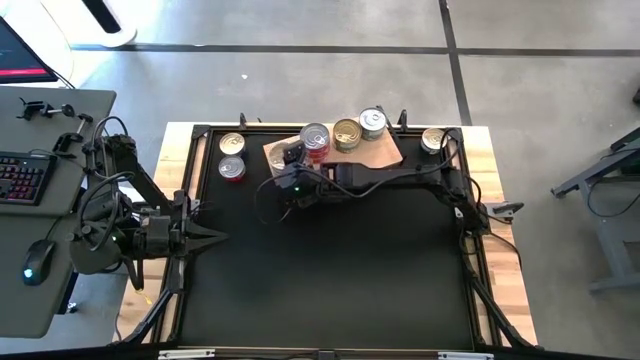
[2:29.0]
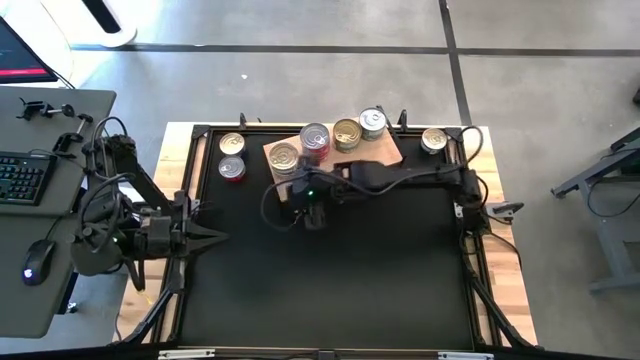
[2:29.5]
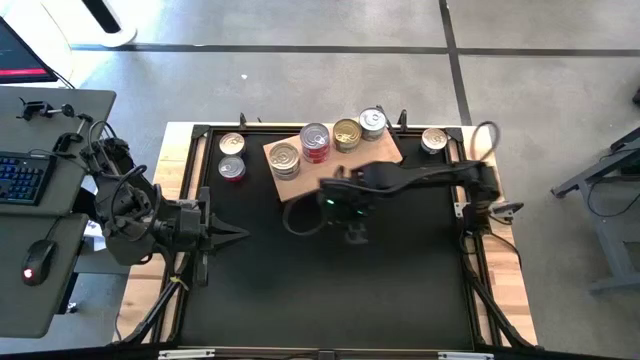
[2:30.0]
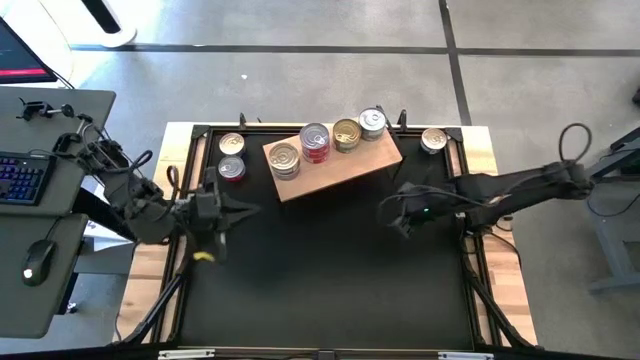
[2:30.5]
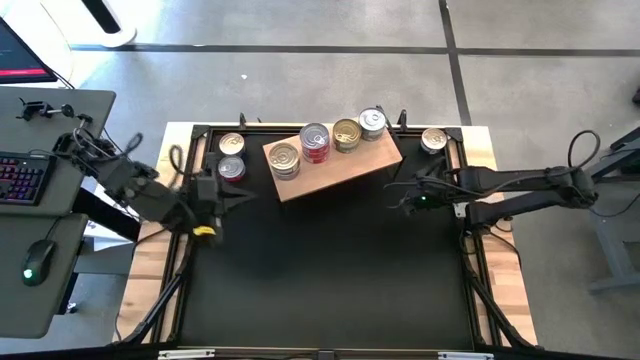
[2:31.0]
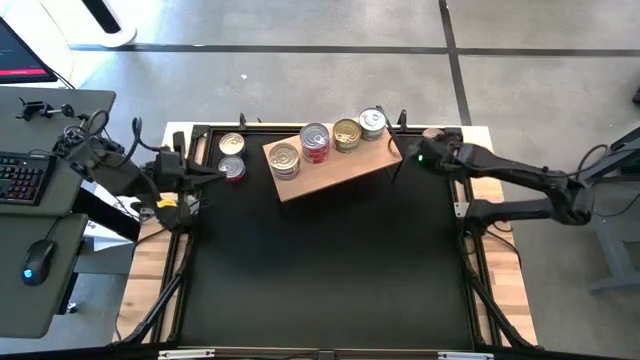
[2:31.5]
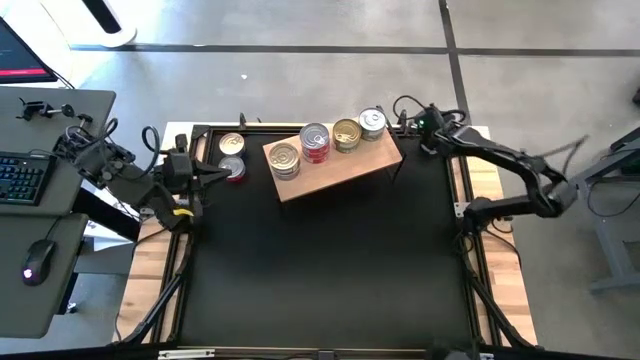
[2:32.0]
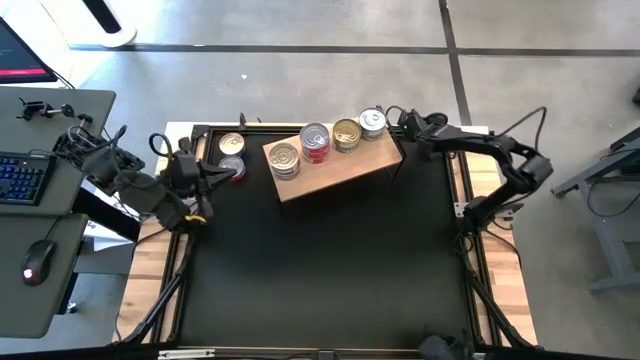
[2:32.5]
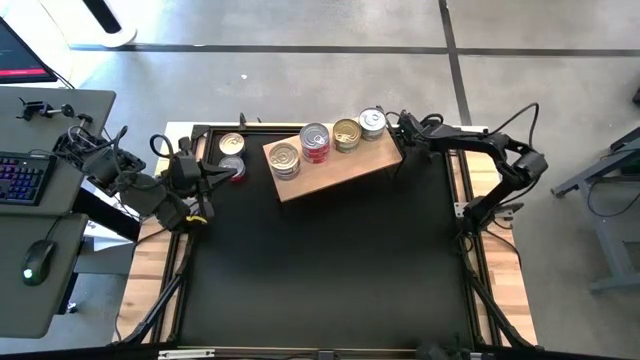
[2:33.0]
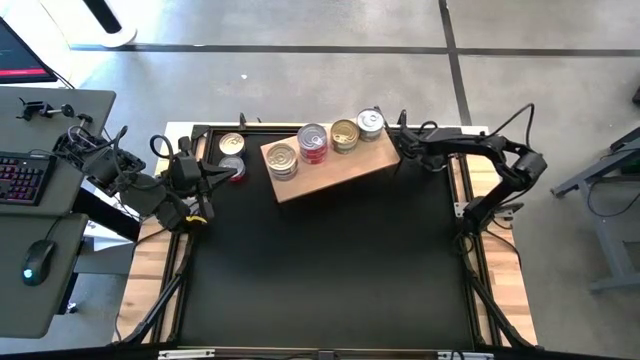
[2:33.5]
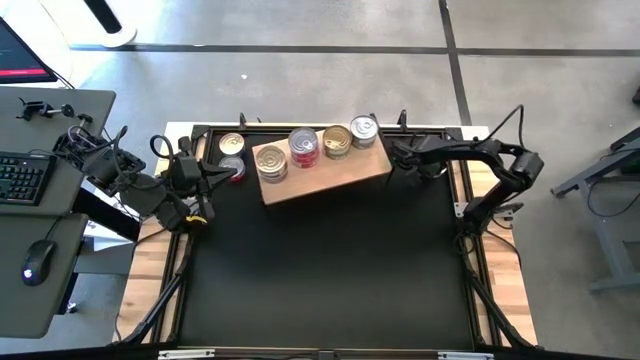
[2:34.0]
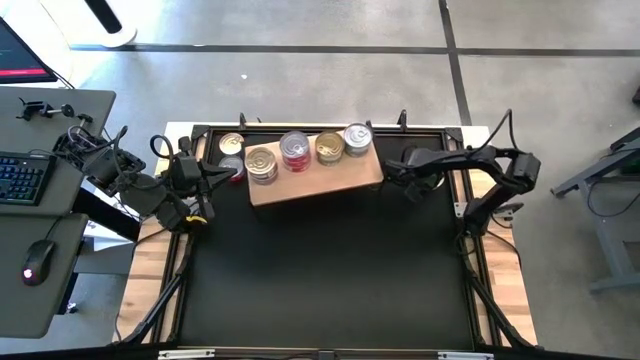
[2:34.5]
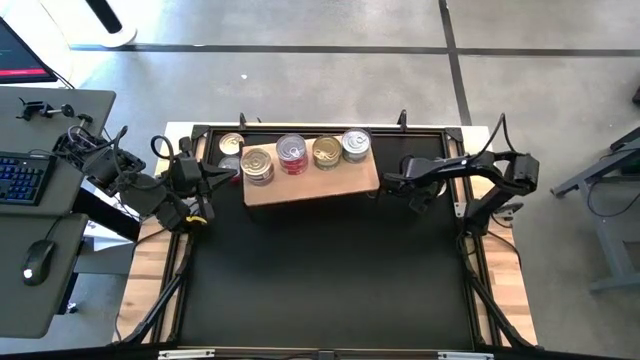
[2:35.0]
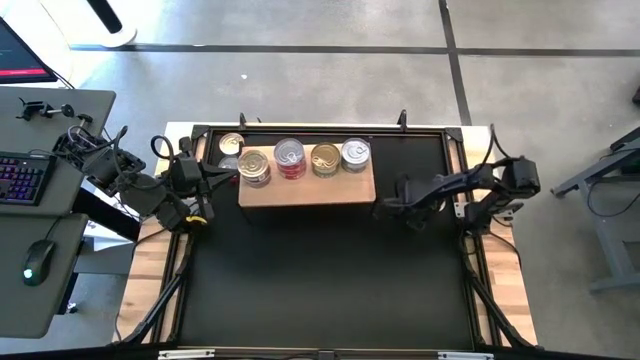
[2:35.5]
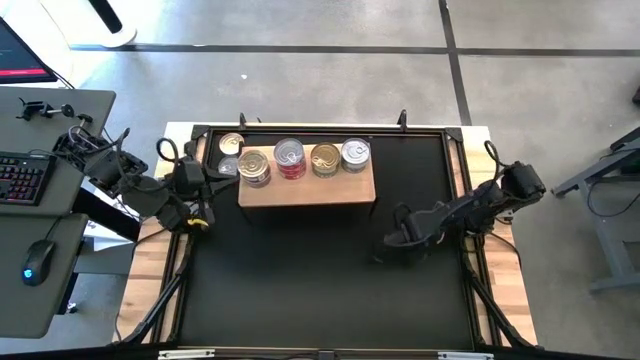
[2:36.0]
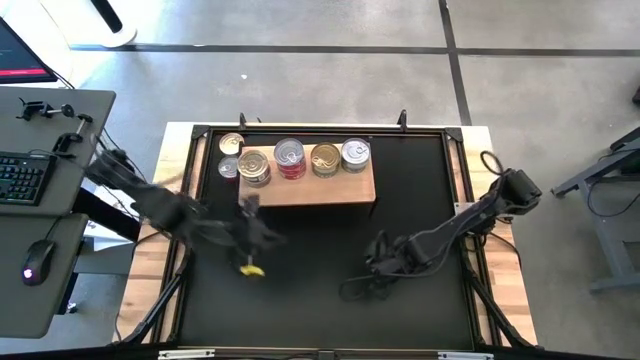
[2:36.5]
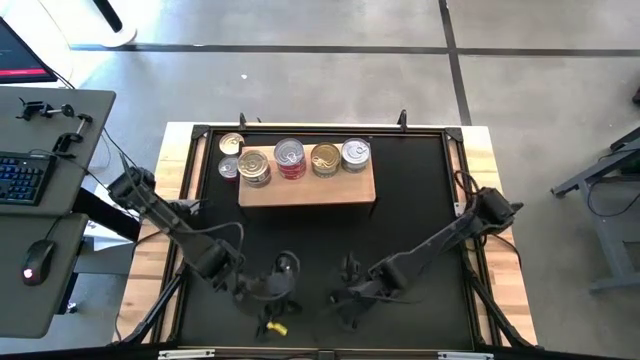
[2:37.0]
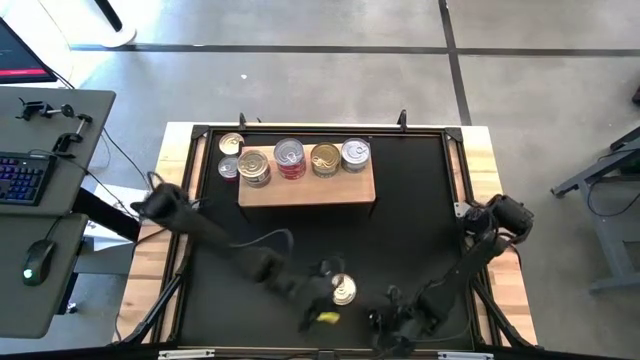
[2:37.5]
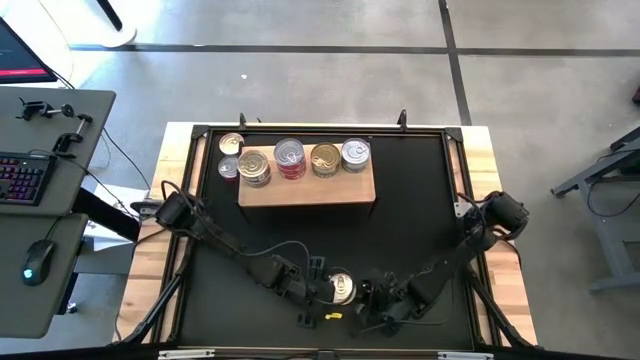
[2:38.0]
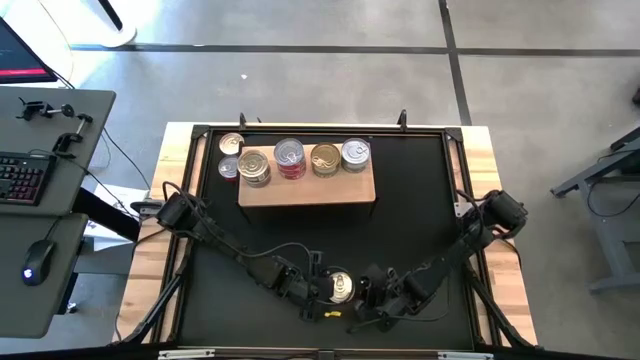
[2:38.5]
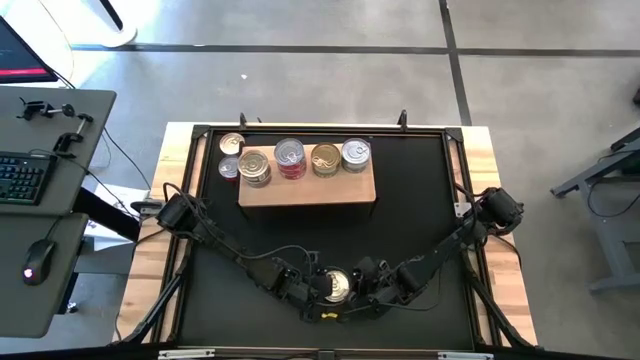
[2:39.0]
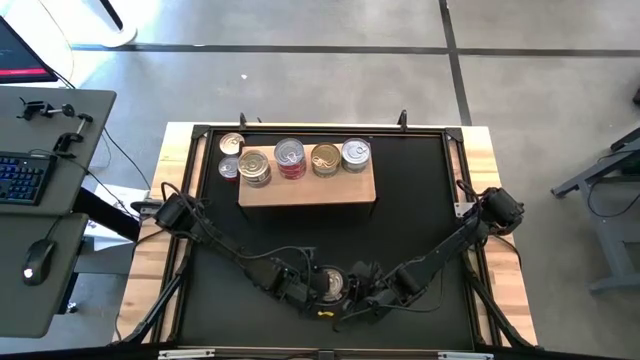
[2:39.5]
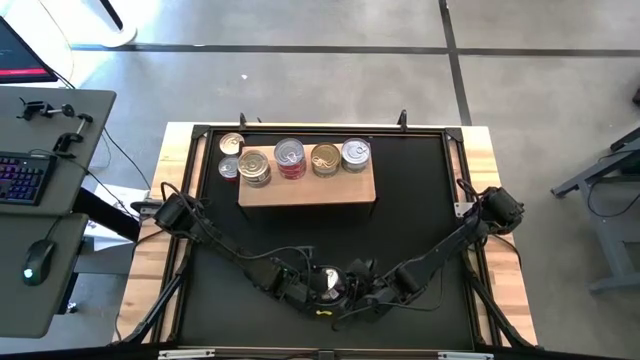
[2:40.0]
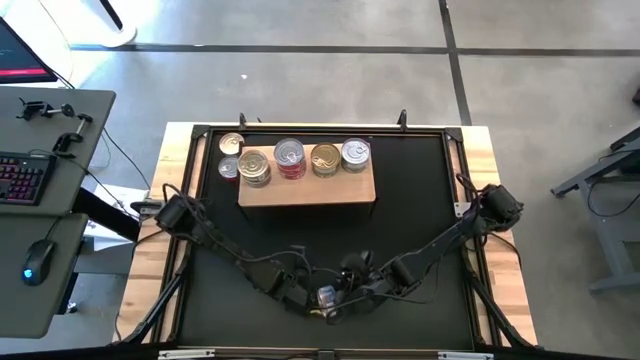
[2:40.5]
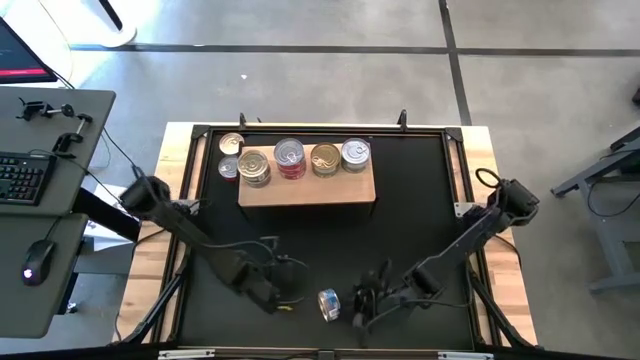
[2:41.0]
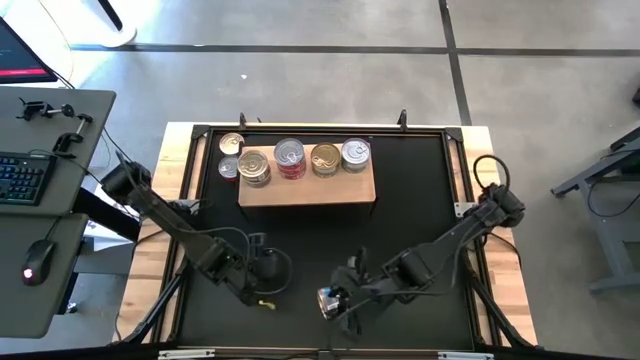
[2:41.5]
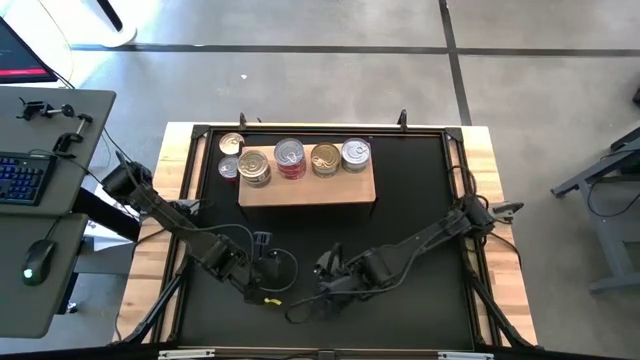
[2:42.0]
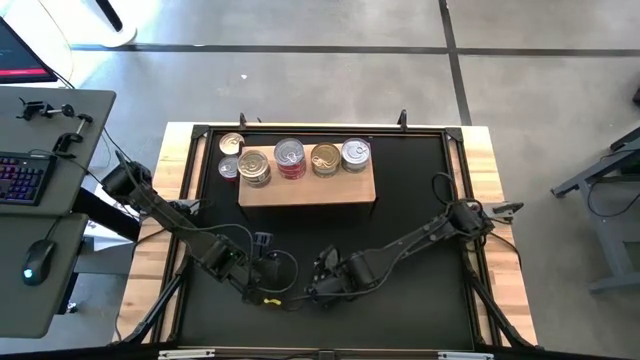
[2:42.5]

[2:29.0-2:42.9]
Task: Stack canned seafood by type on shelf
Stack the right blue and red tuna can on top of the blue and red tuna cans on the shelf

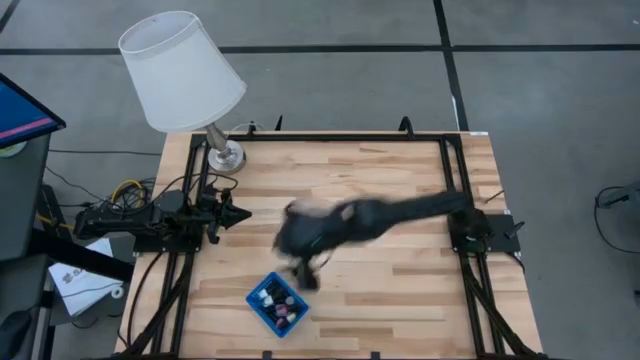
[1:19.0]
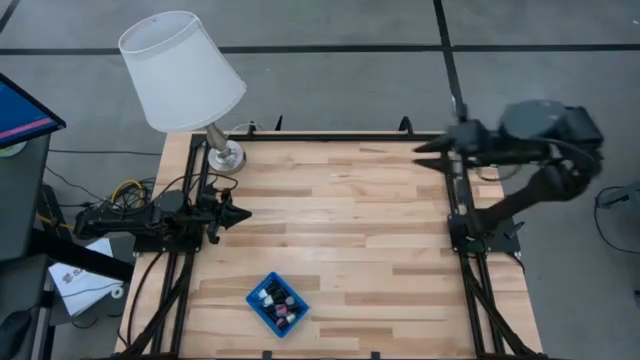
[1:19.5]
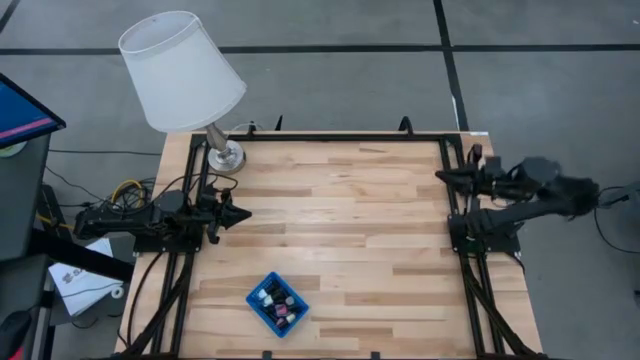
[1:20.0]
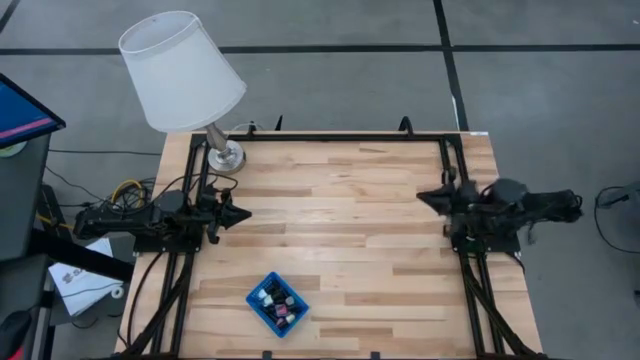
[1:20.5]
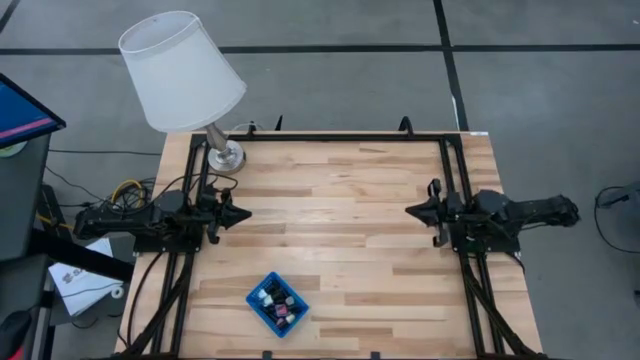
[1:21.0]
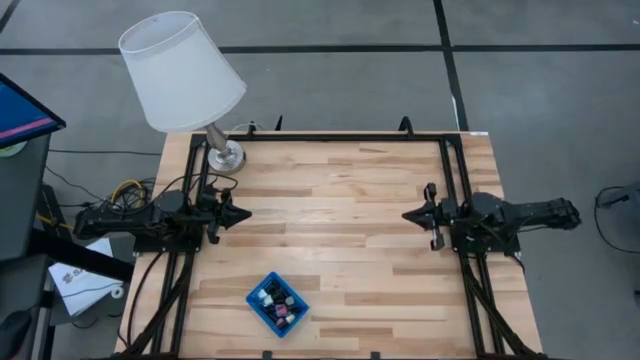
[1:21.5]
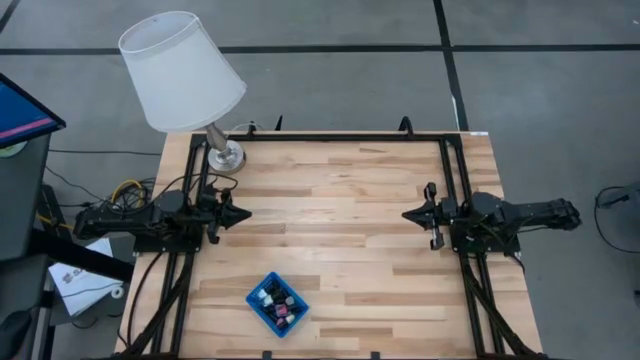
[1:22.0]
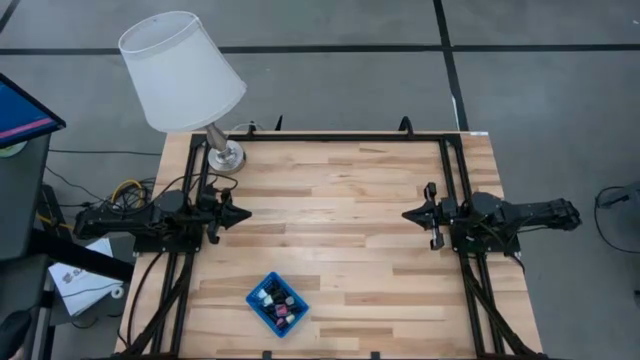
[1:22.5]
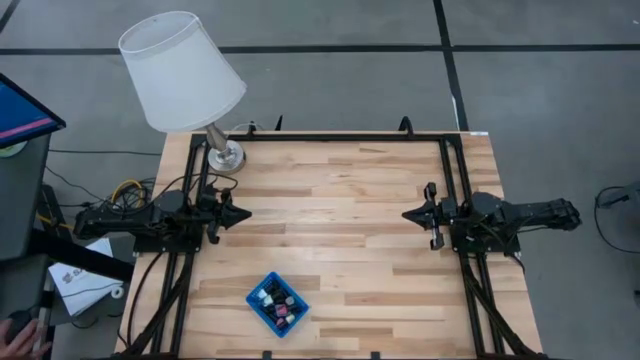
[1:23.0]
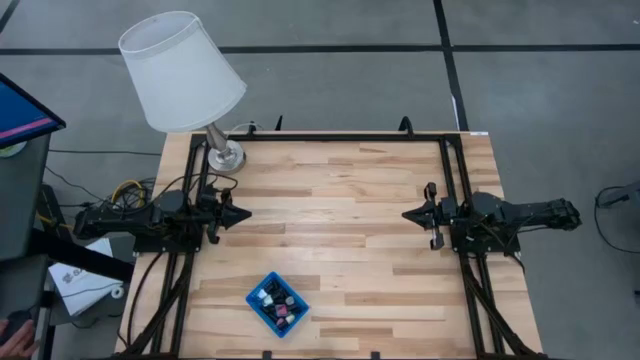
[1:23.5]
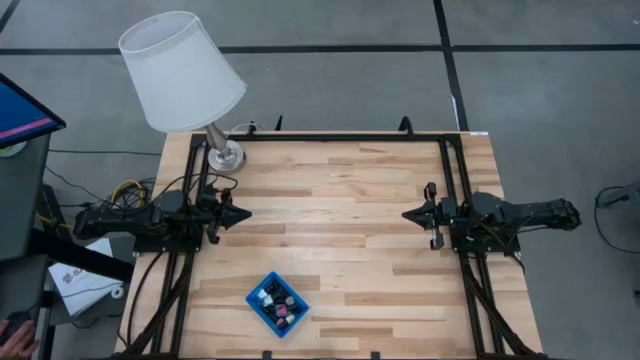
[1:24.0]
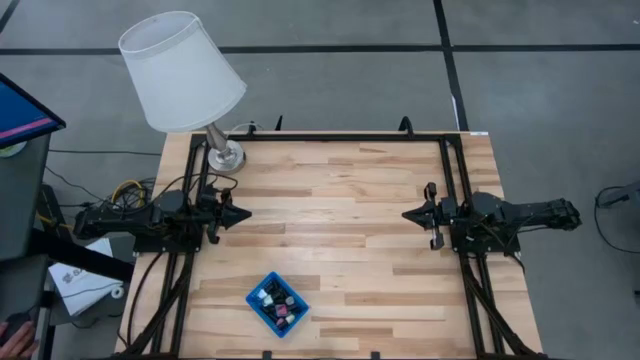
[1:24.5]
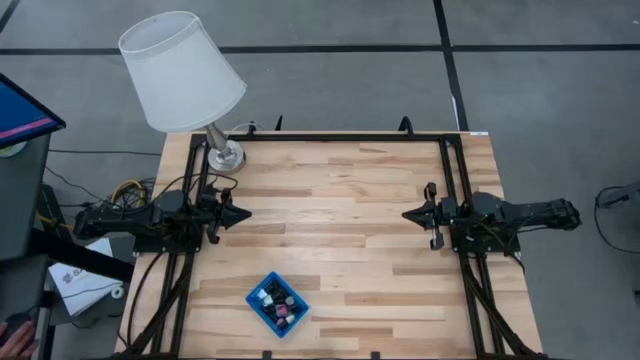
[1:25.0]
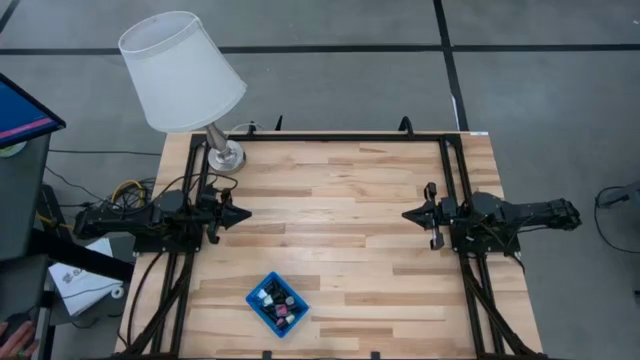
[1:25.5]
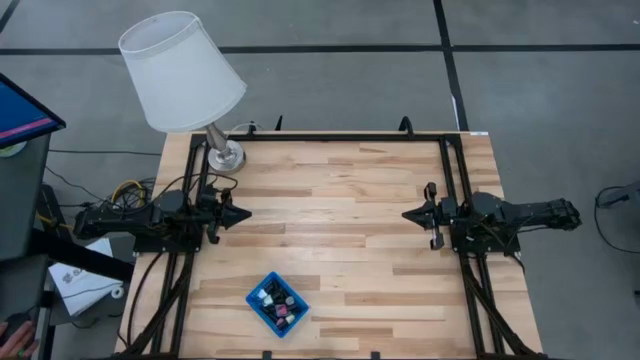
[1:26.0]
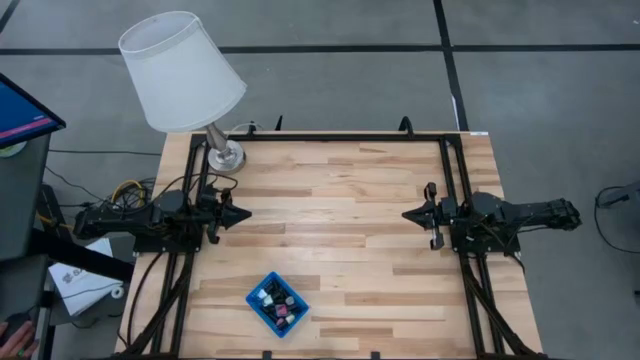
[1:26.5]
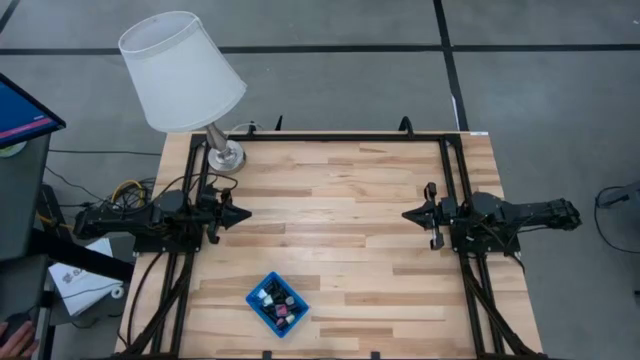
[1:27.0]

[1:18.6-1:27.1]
Task: Pick & Place Nail Polish
Return to home position
